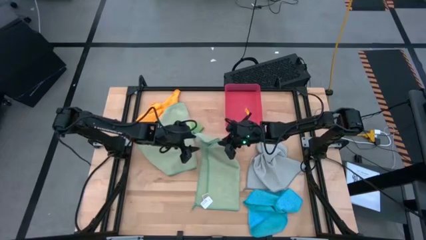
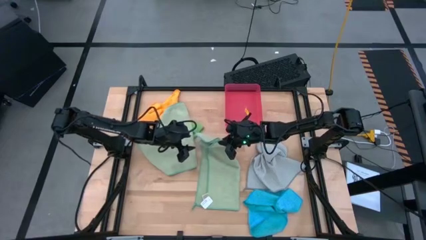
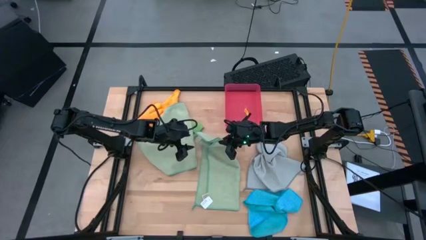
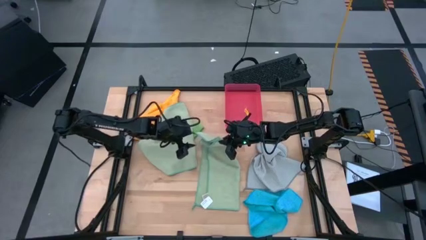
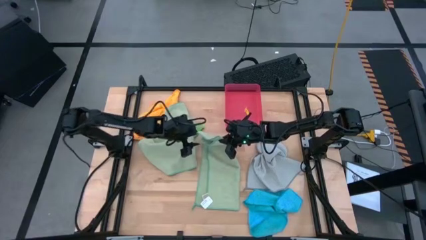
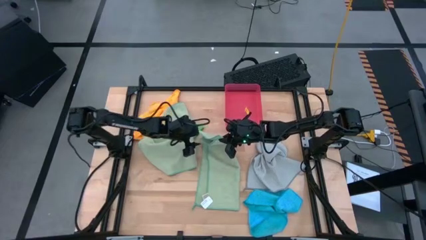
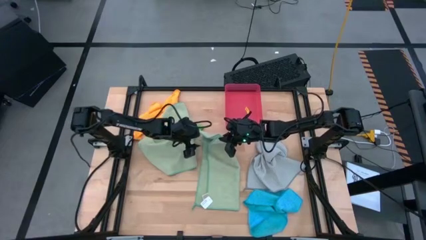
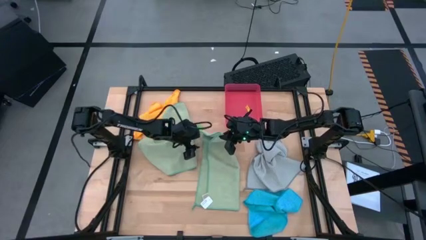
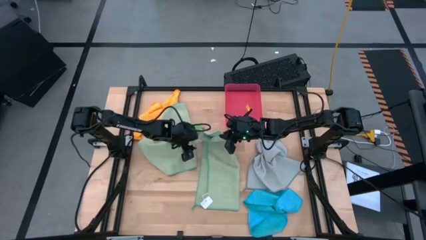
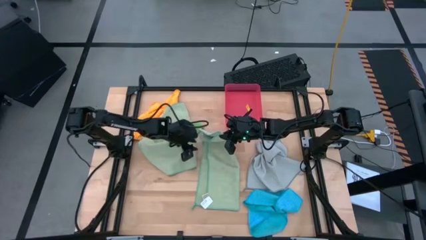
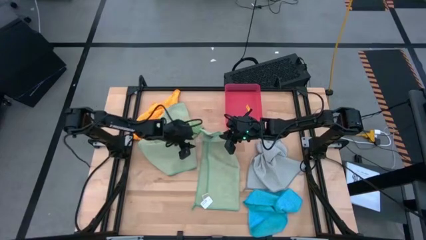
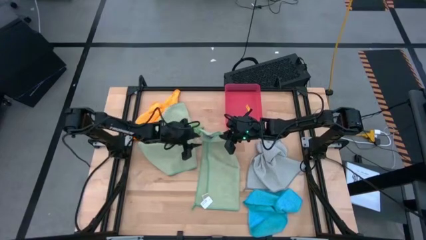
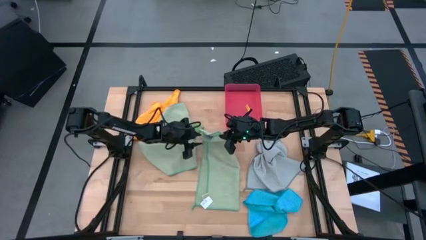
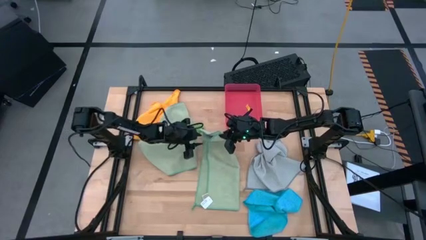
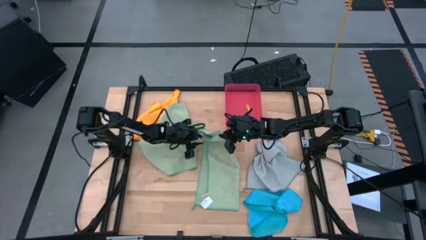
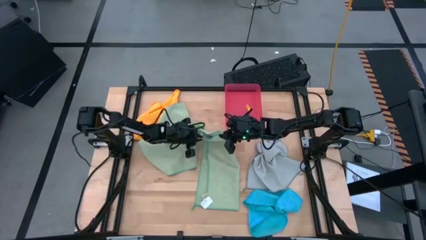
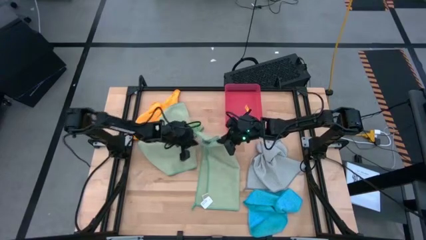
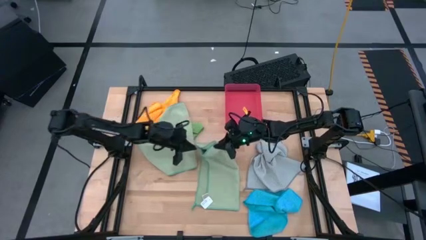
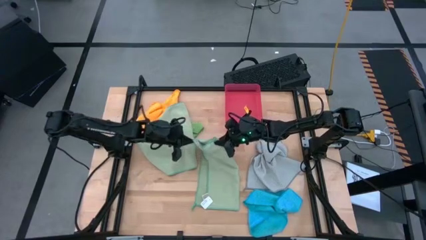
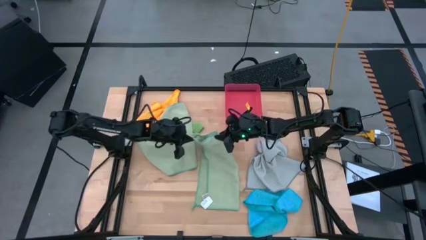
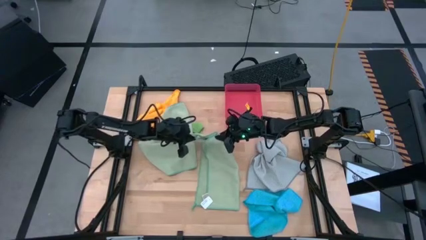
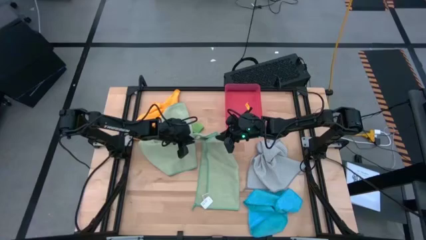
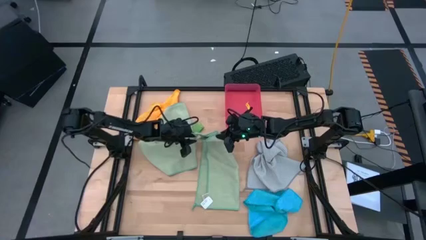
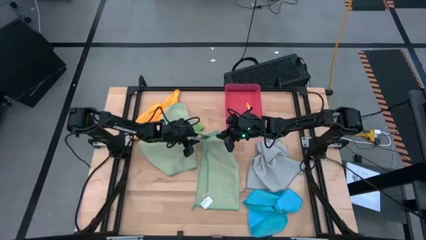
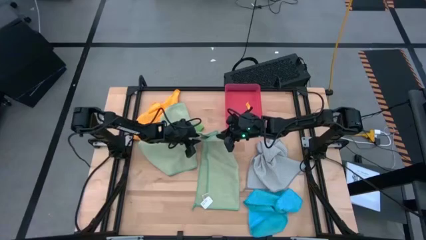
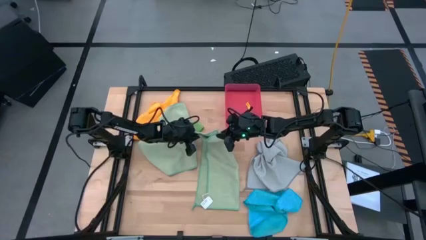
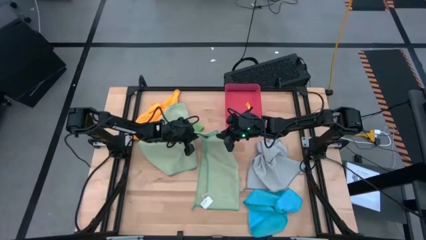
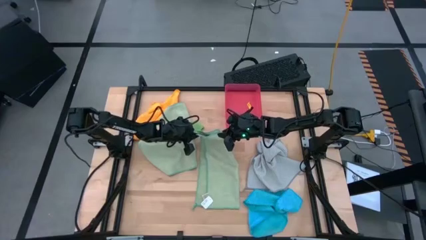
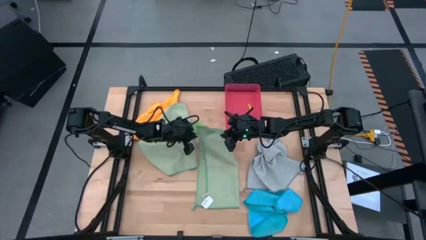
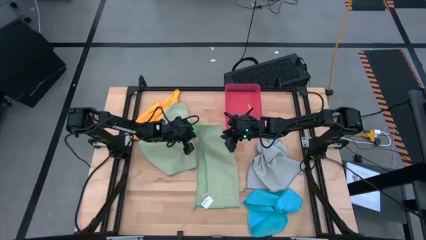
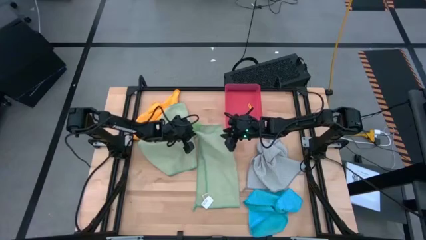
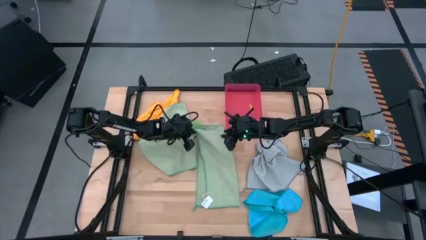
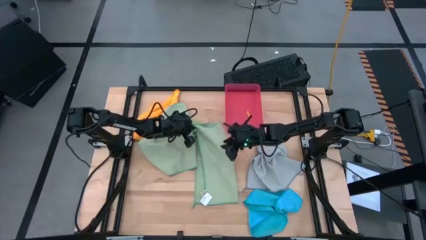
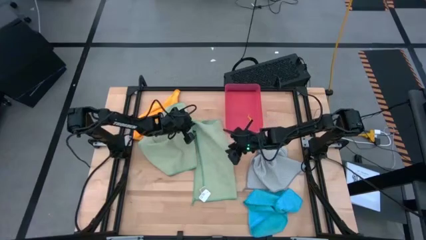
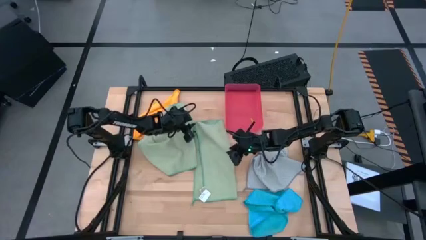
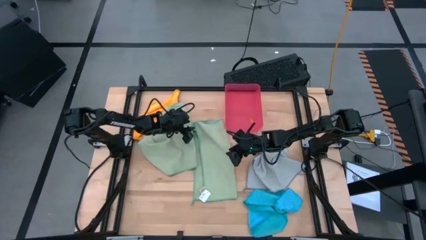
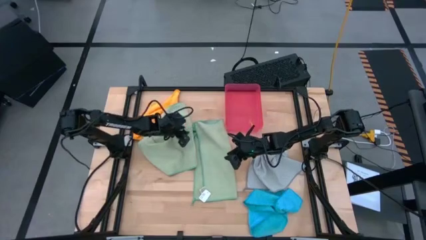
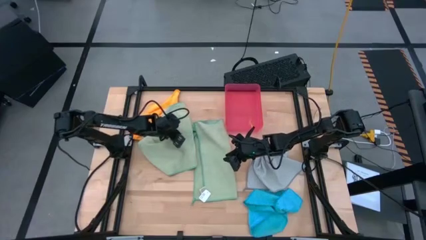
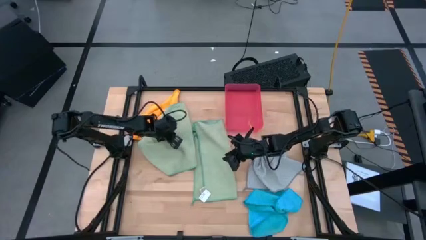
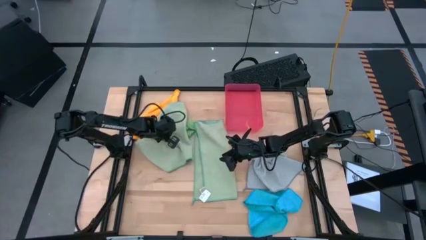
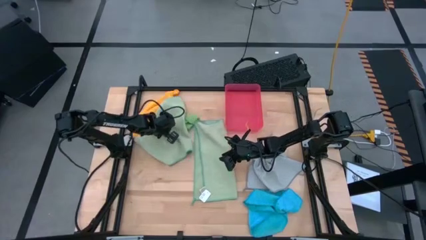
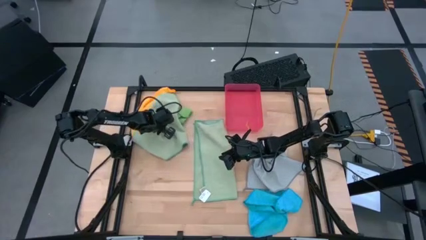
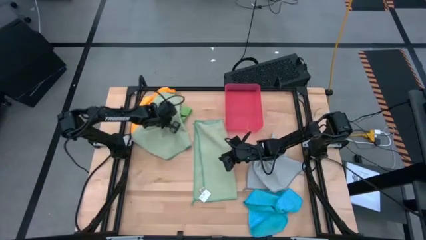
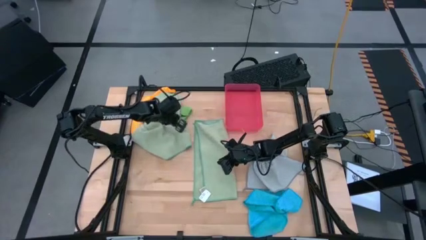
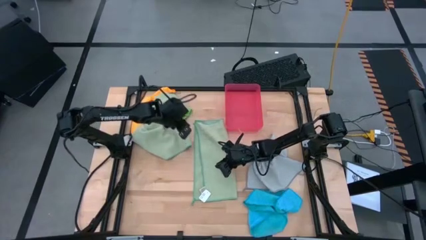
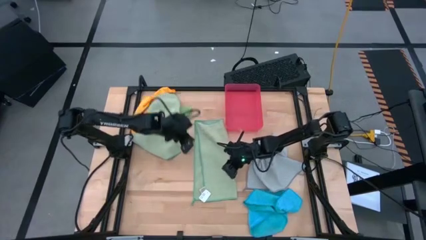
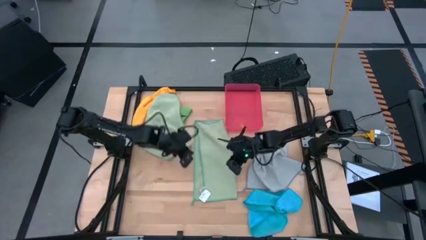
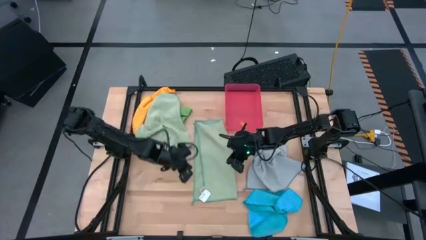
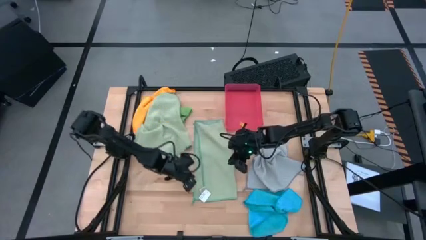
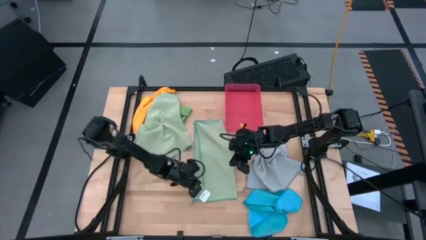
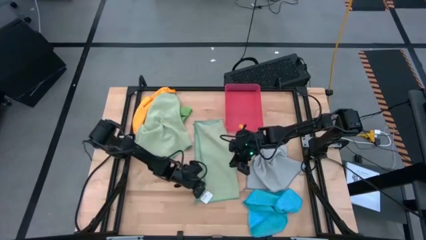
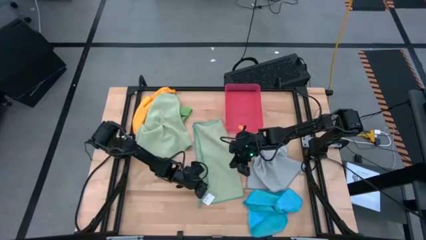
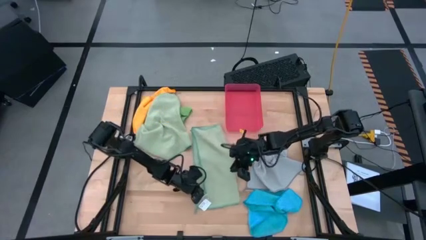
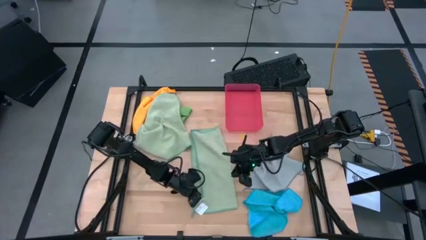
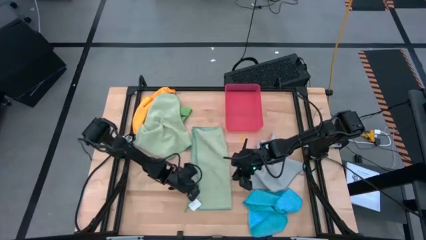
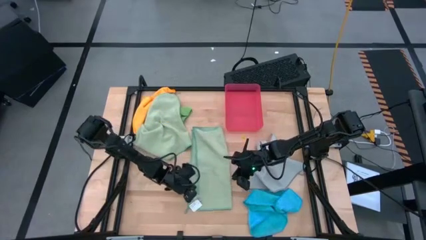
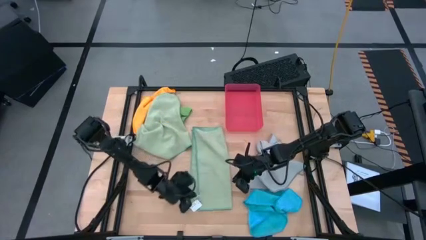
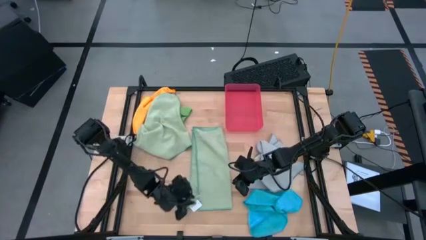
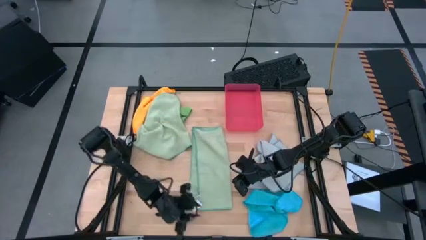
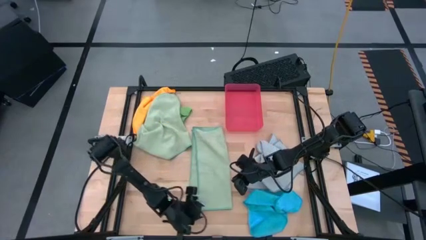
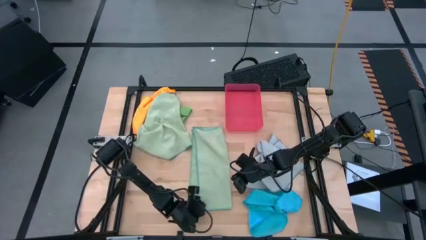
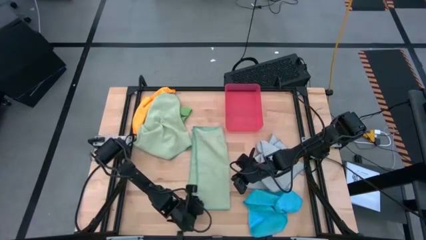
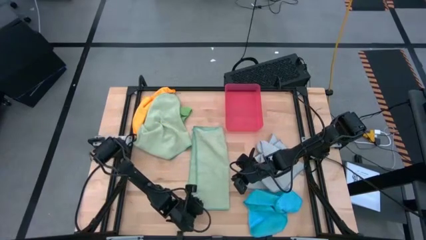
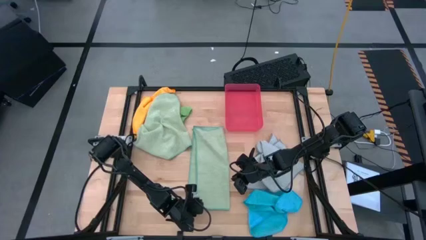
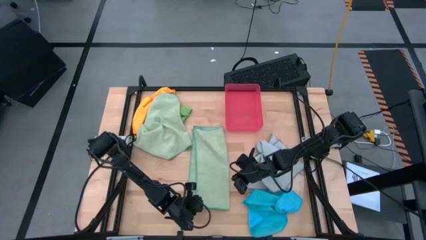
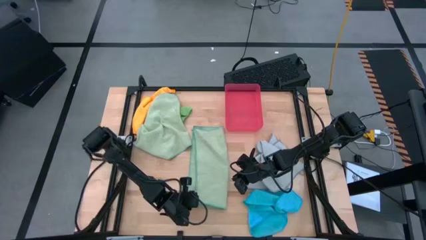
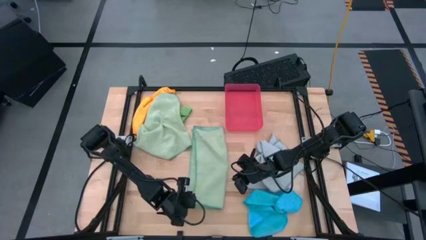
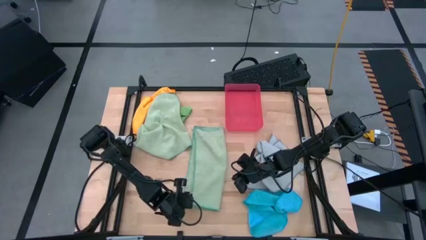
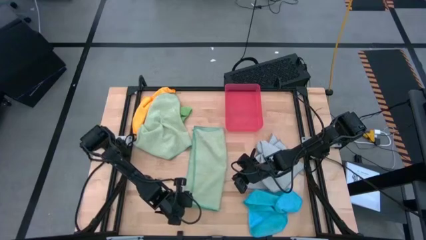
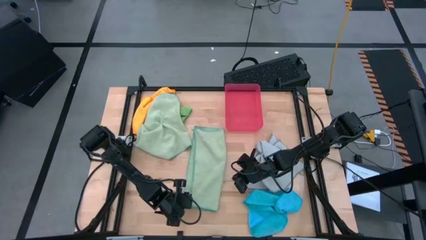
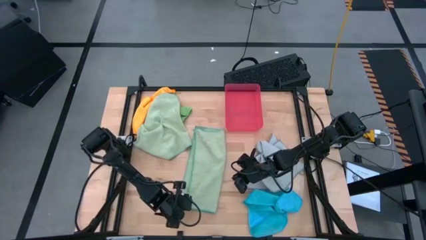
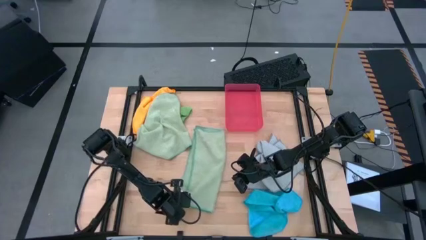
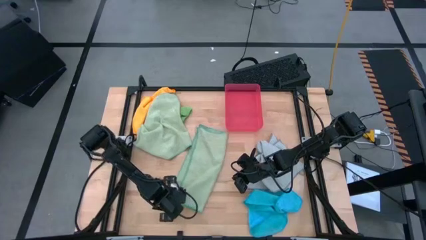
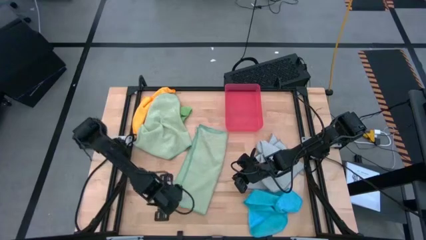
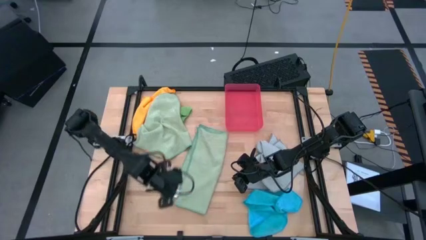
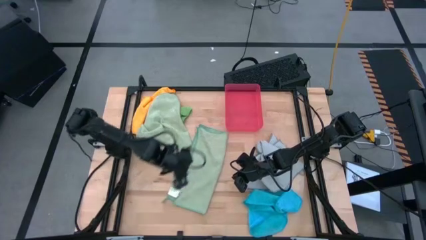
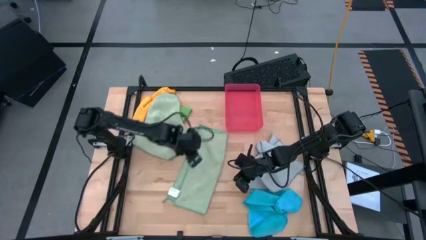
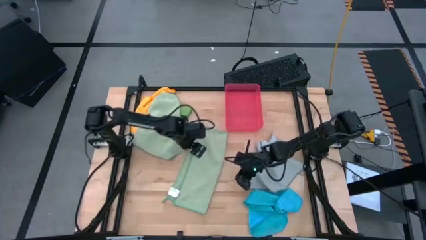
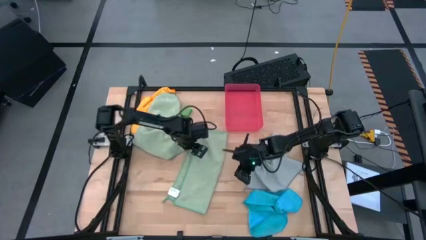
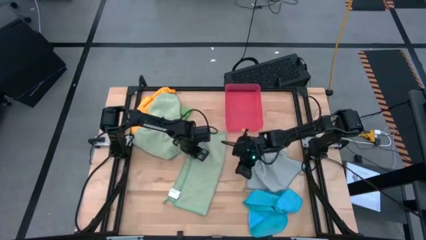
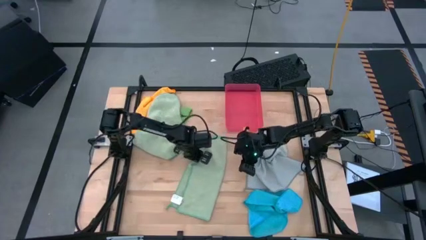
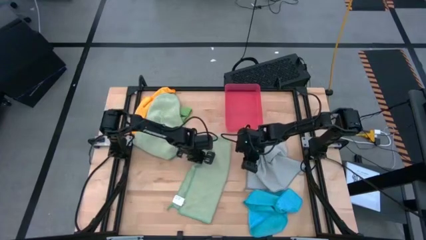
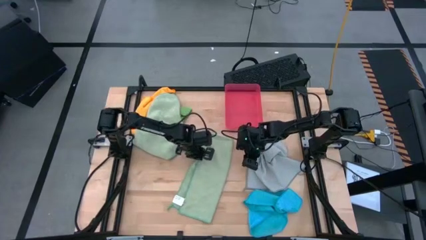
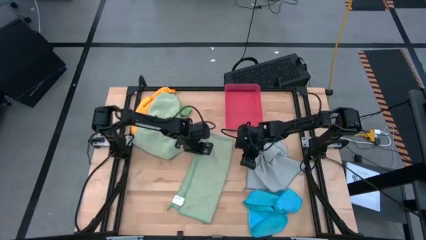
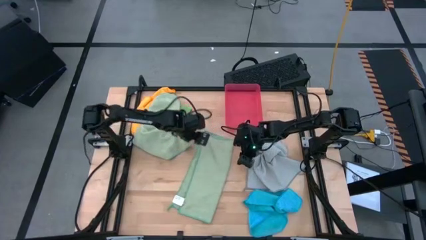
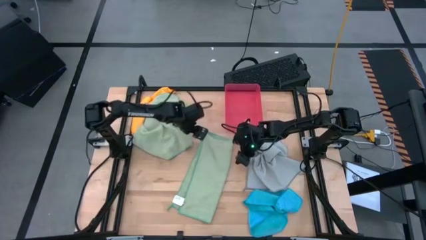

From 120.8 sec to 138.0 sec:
Task: Fold microfiber towels
Fold the right light green microfiber cloth
